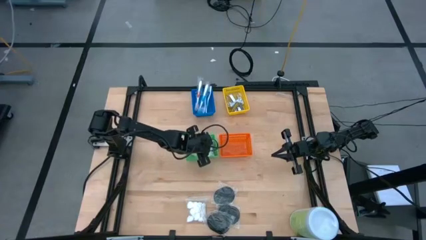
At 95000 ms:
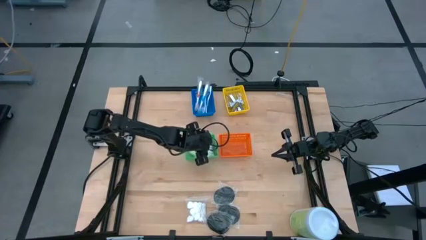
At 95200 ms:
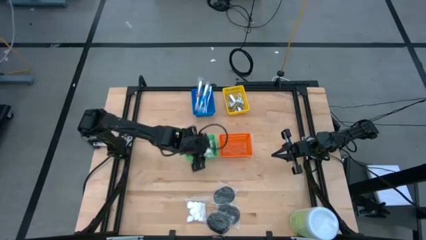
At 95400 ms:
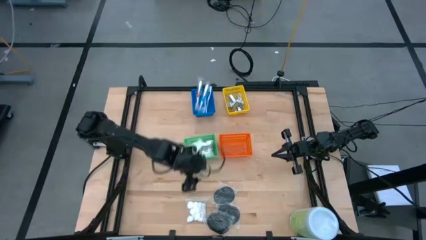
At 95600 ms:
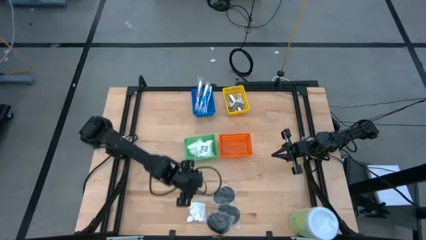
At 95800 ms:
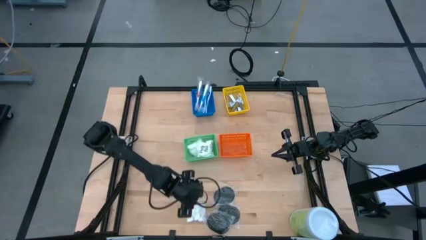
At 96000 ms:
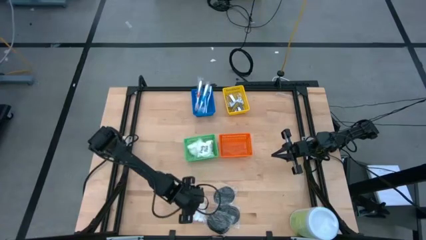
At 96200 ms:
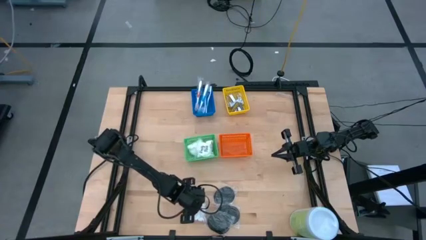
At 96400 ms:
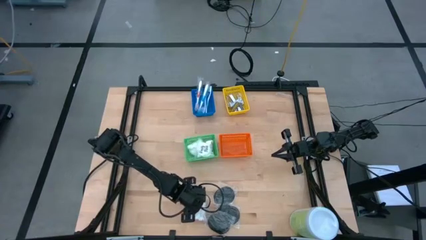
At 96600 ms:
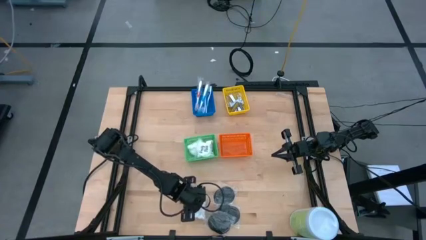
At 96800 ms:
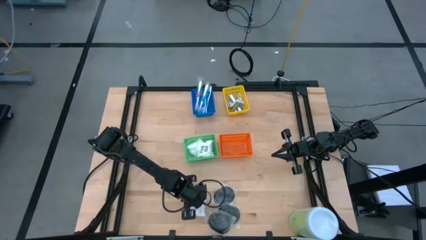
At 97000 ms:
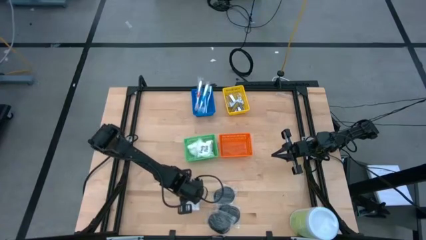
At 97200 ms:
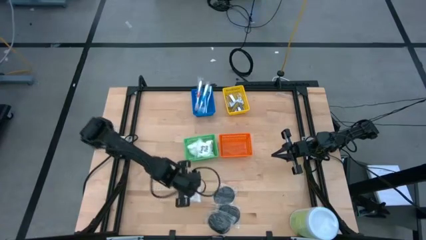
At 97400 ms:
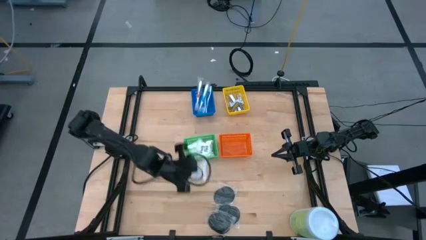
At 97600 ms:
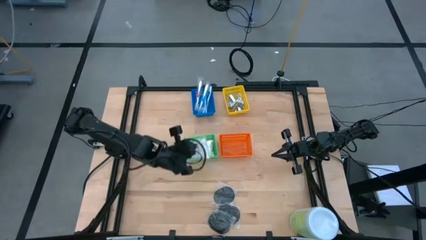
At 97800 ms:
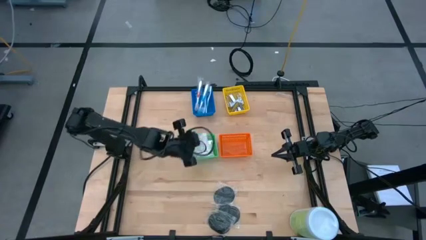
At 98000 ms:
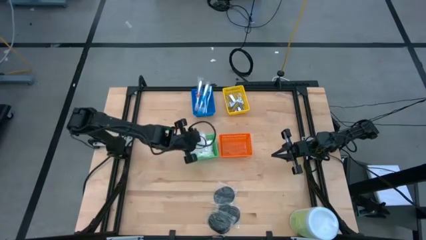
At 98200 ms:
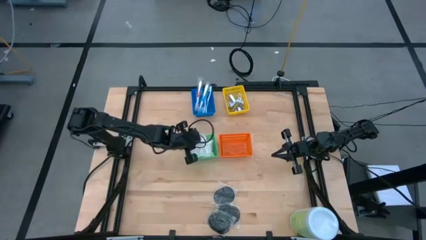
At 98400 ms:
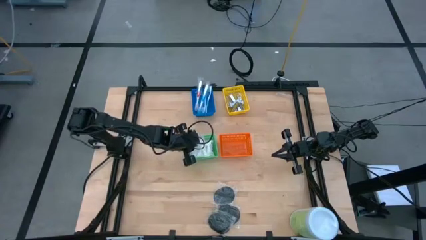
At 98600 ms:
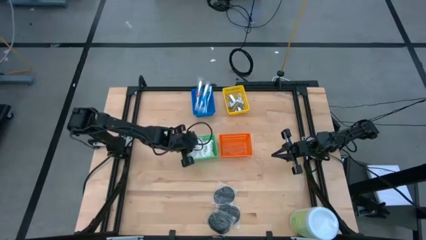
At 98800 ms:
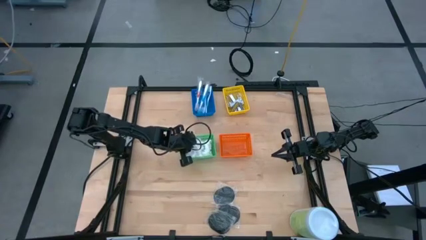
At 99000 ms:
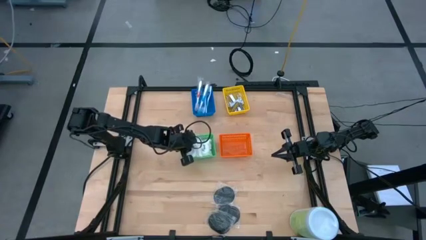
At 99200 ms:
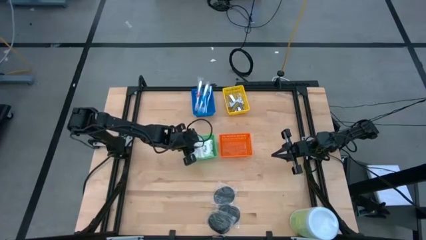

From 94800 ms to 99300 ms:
Task: Pick & Place Travel size toiletries
Put the cotton pack into the green bin

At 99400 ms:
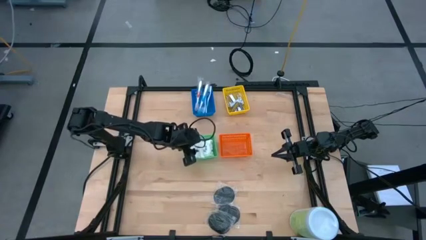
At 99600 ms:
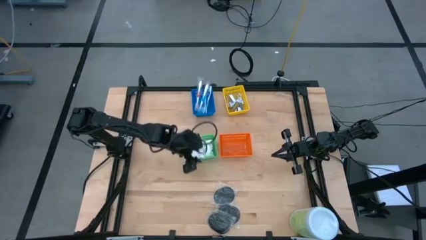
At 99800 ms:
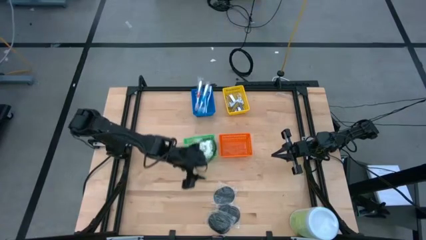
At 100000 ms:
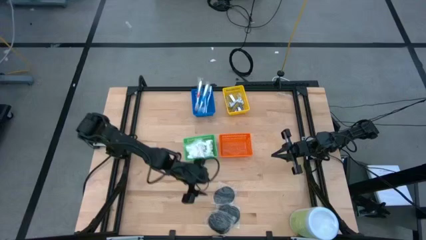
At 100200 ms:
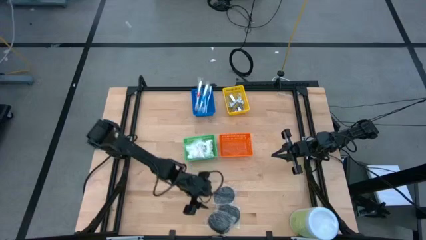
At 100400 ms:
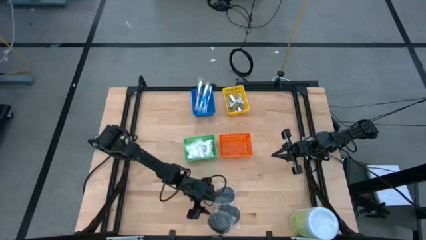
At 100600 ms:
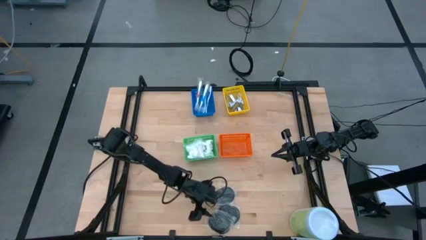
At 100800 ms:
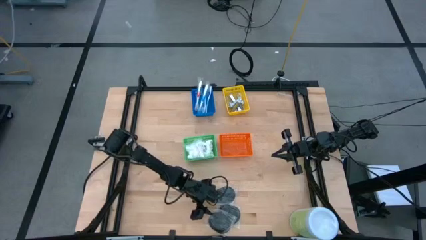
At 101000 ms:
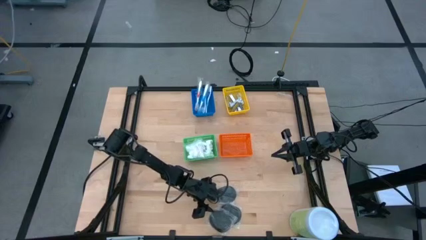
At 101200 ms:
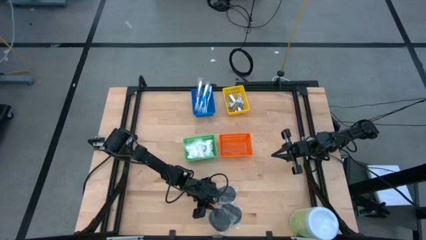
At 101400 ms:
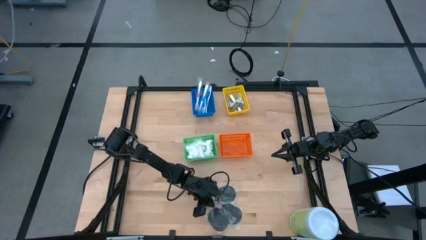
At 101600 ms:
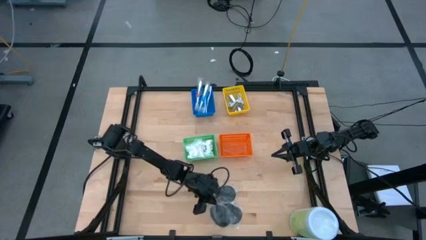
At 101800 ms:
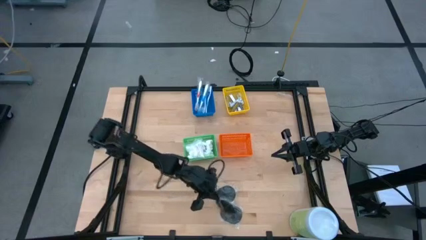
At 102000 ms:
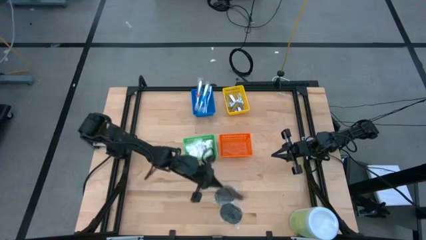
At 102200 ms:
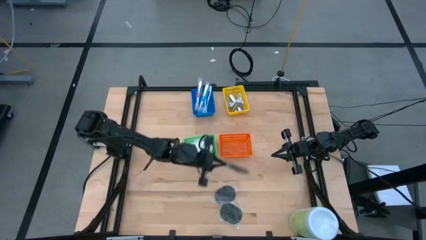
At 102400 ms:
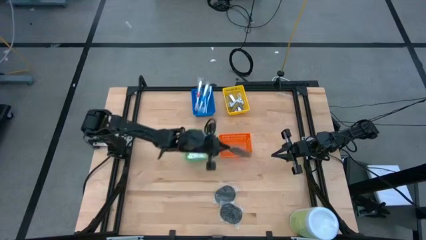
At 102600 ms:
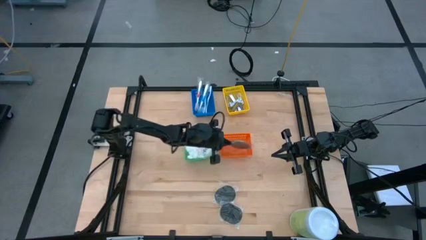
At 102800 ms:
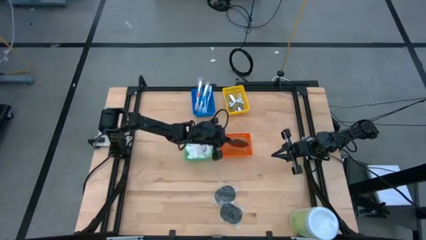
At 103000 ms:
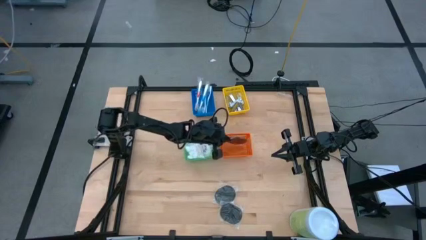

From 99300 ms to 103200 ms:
Put the bottom hairbrush into the orange bin

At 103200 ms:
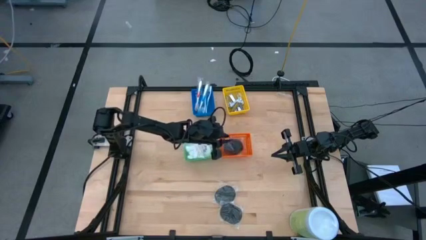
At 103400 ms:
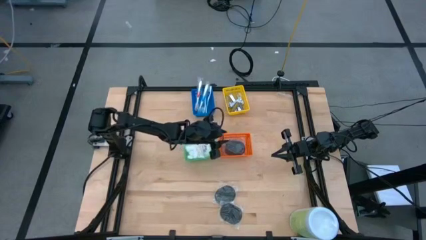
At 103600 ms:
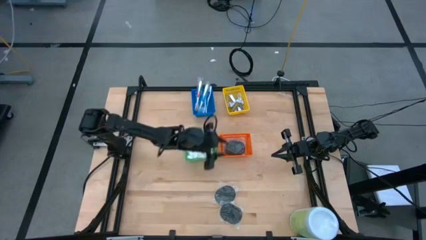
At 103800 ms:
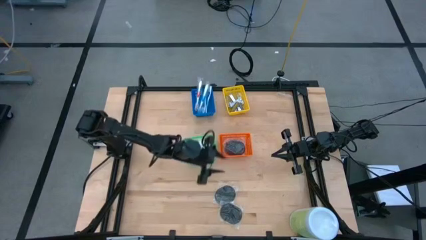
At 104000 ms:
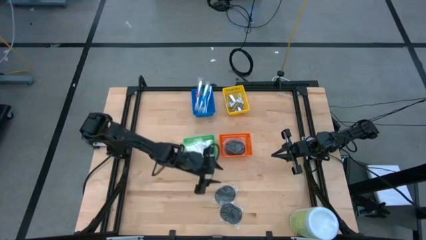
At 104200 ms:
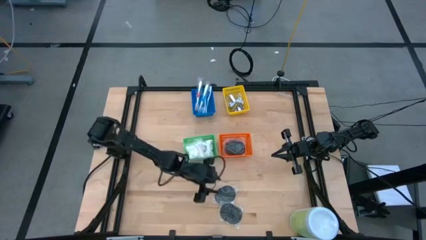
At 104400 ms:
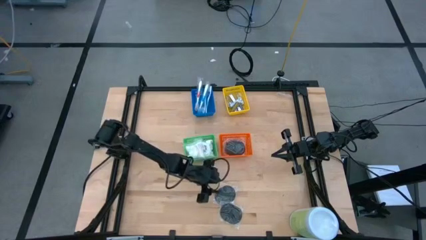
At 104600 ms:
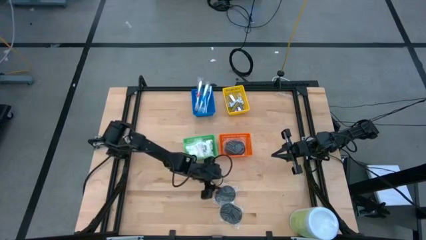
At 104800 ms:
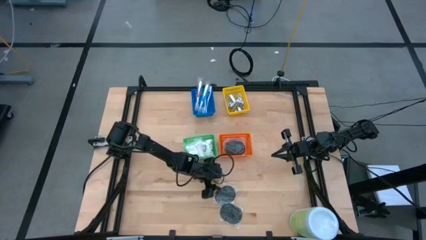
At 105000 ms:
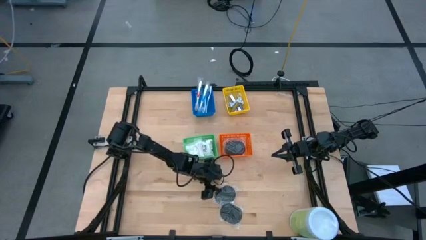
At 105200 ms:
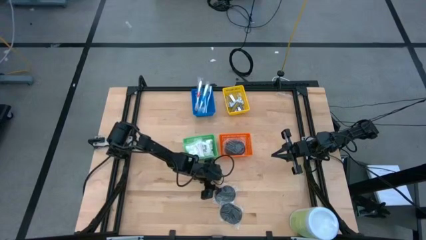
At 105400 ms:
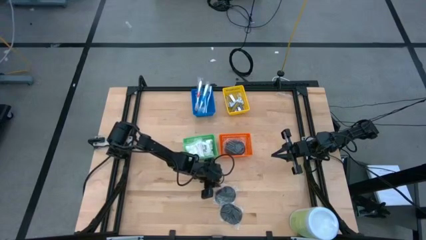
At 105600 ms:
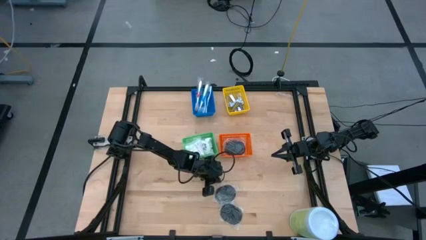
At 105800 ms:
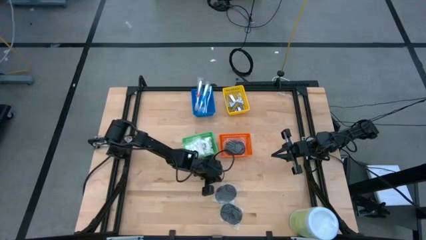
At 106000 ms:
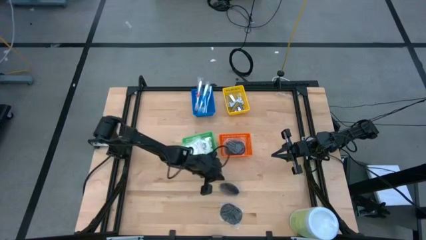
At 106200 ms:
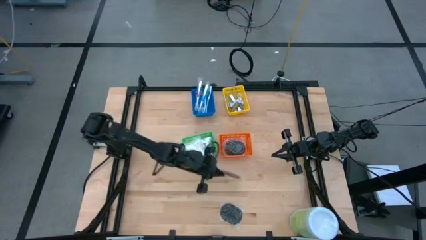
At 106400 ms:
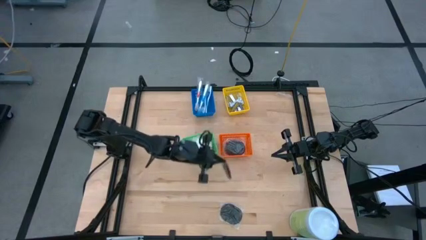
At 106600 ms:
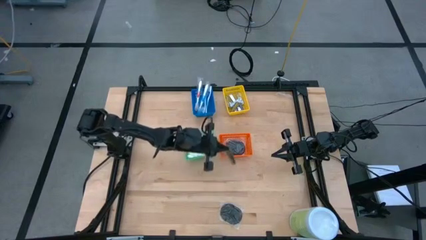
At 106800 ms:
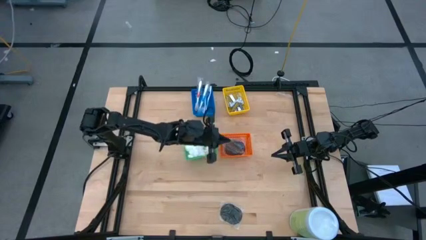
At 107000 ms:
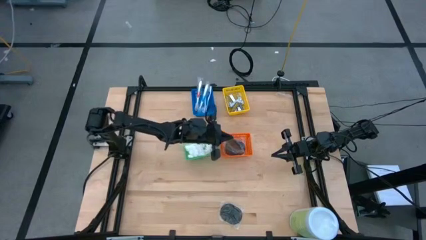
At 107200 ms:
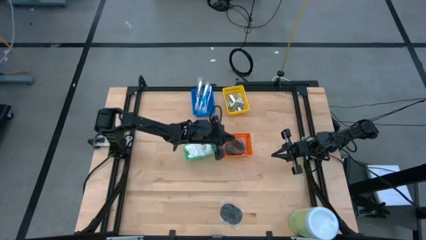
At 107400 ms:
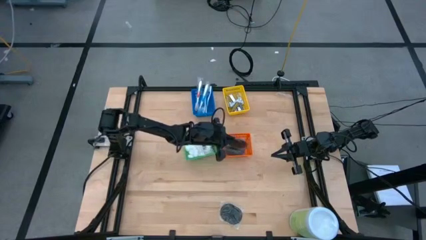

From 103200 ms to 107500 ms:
Put the top hairbrush into the orange bin

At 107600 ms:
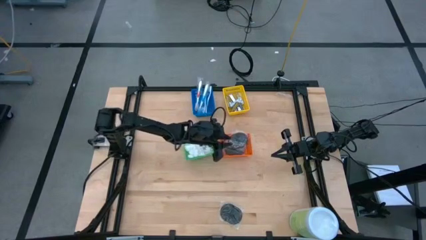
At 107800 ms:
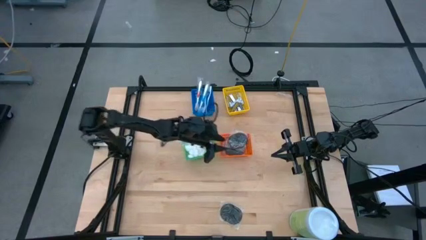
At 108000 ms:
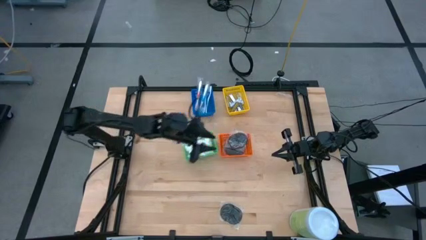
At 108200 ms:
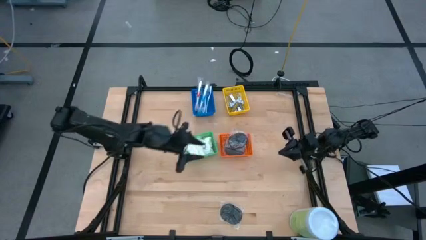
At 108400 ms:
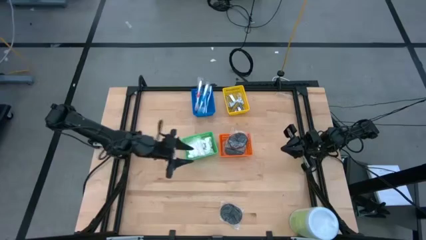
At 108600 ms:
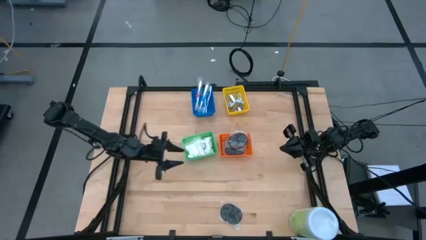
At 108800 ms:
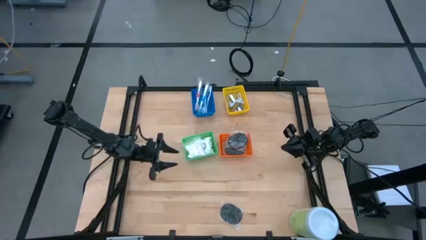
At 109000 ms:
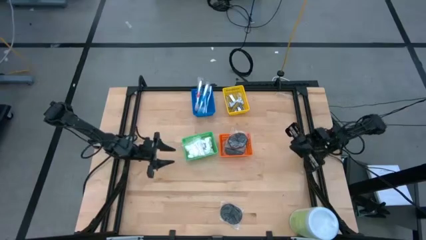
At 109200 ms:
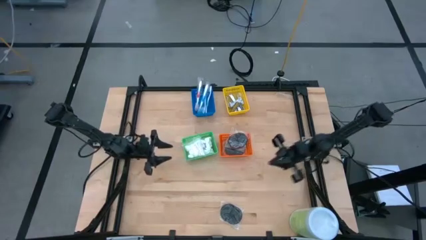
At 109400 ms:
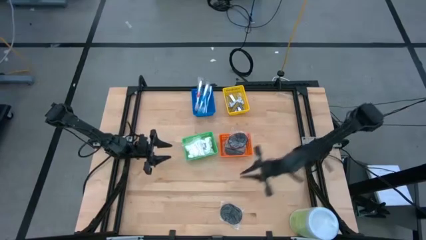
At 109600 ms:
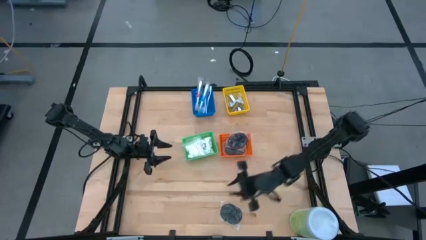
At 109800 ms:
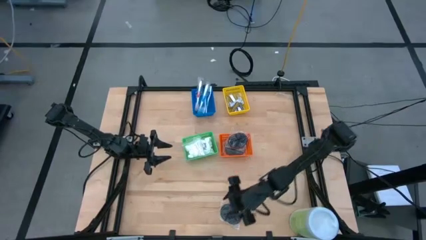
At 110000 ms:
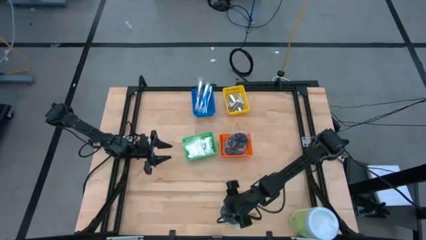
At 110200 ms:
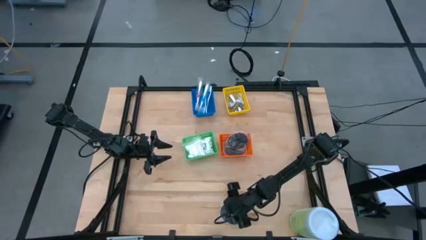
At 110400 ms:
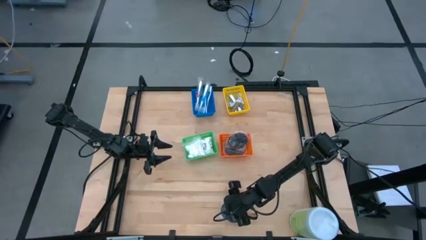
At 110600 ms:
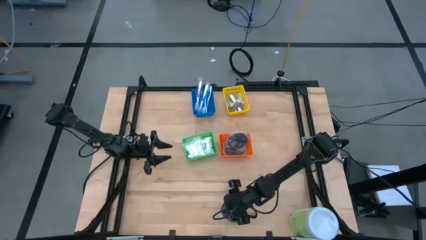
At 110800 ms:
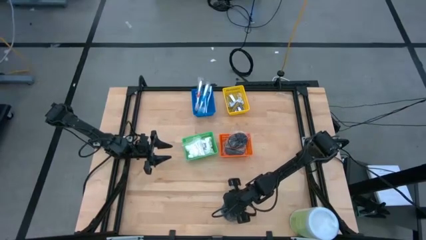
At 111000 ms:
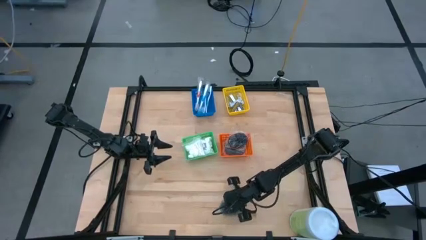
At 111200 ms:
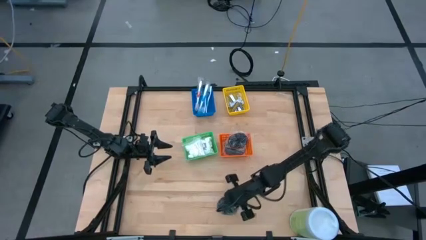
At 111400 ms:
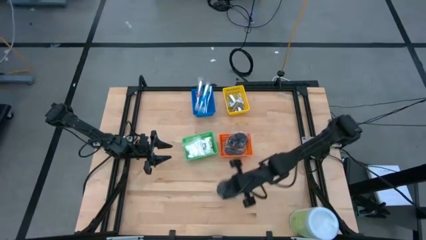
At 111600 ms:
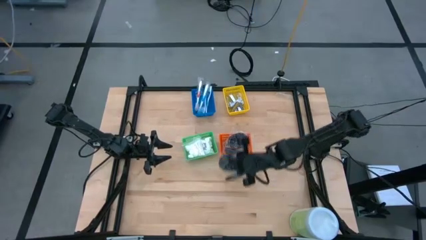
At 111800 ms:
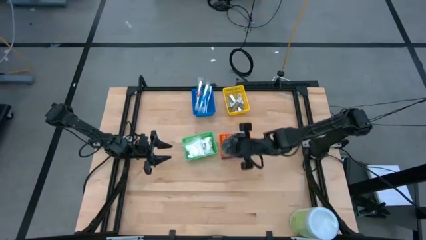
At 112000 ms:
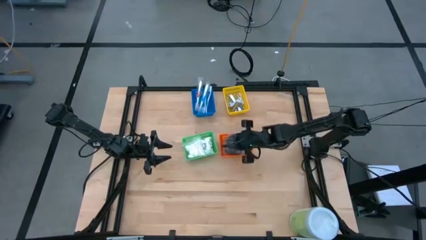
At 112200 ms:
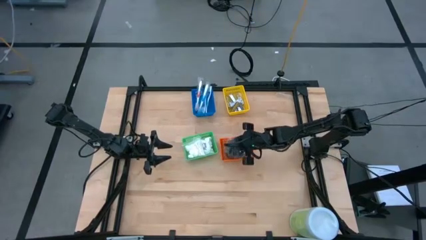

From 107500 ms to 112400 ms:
Put the hairbrush into the orange bin
